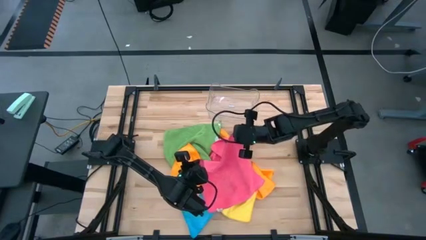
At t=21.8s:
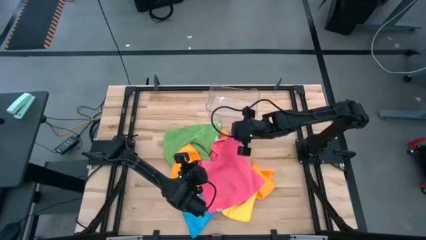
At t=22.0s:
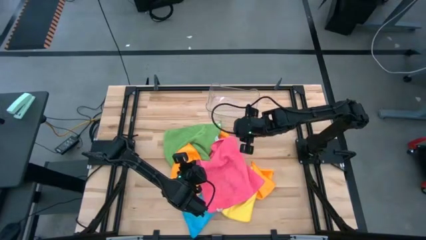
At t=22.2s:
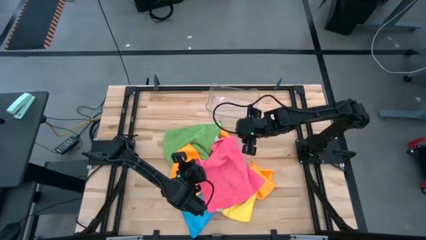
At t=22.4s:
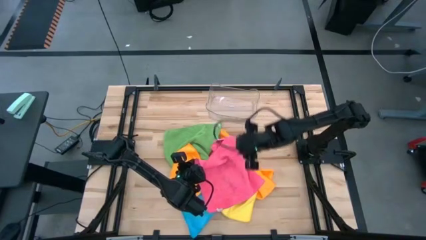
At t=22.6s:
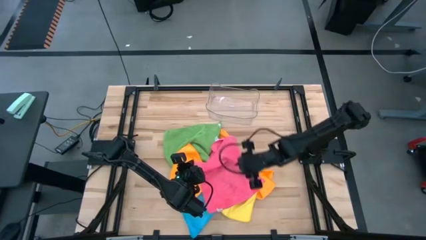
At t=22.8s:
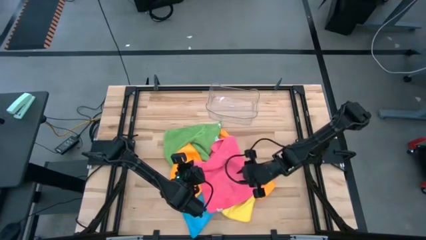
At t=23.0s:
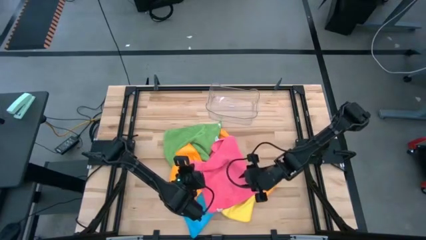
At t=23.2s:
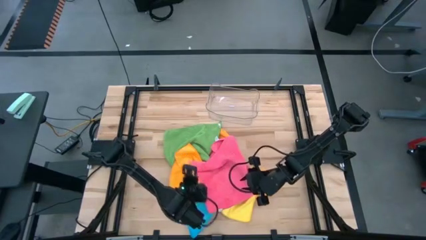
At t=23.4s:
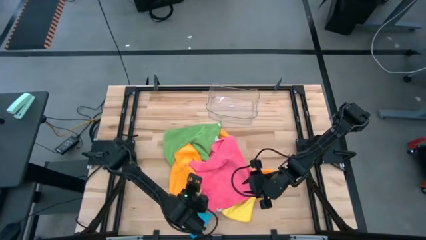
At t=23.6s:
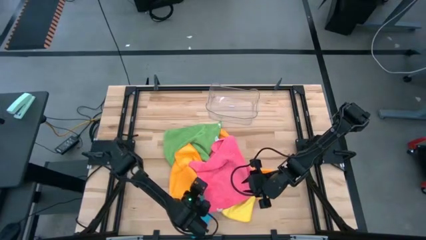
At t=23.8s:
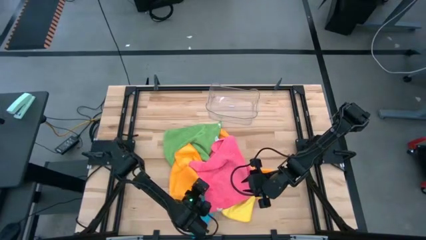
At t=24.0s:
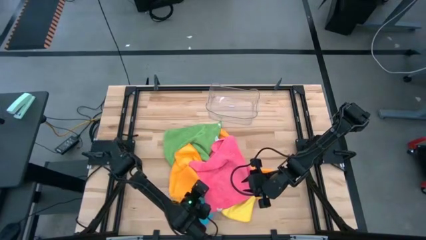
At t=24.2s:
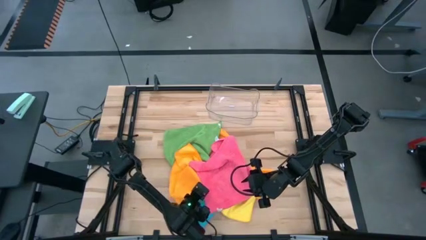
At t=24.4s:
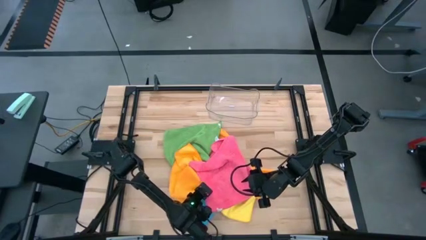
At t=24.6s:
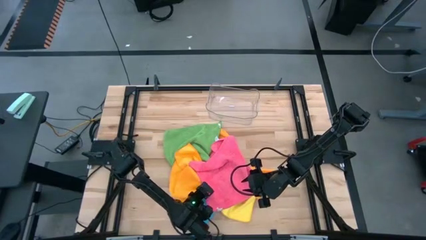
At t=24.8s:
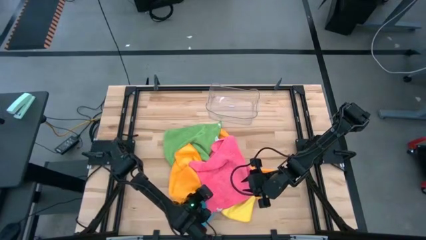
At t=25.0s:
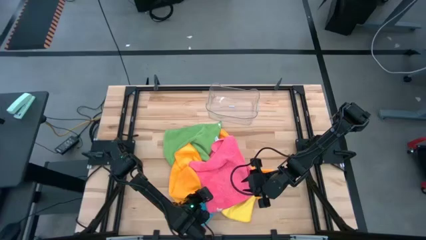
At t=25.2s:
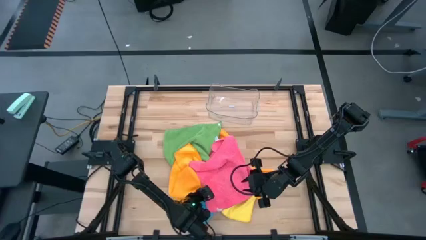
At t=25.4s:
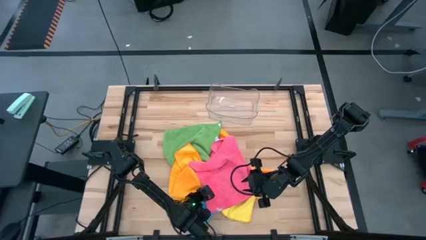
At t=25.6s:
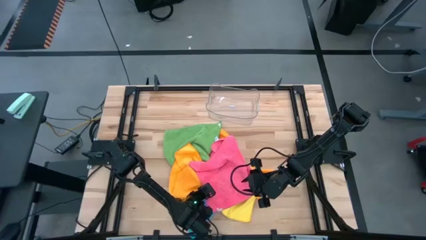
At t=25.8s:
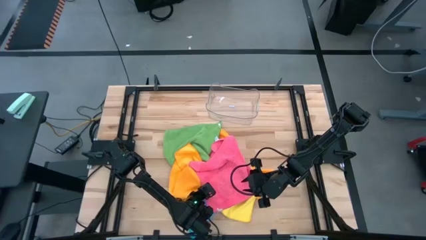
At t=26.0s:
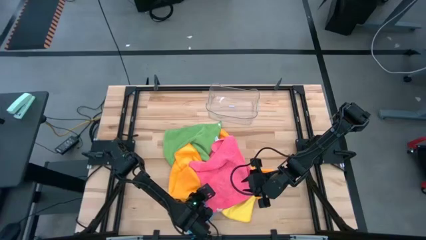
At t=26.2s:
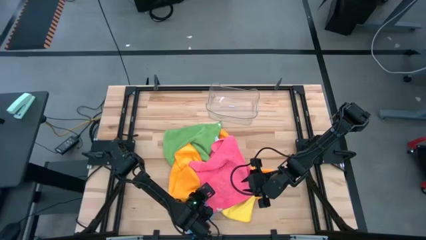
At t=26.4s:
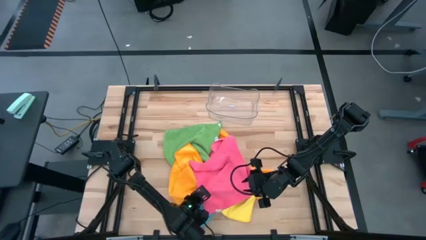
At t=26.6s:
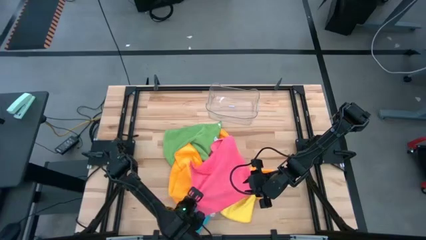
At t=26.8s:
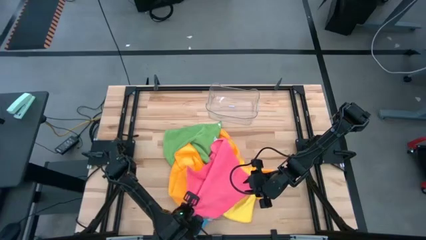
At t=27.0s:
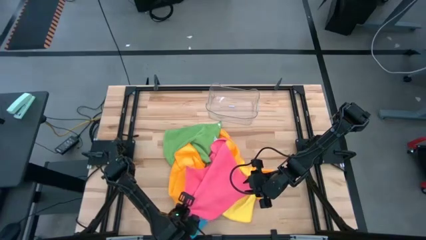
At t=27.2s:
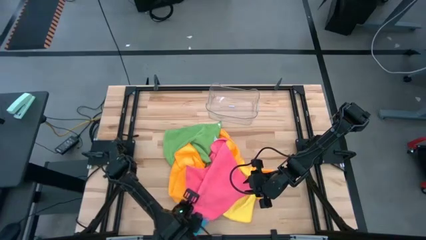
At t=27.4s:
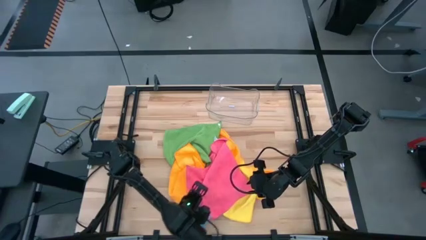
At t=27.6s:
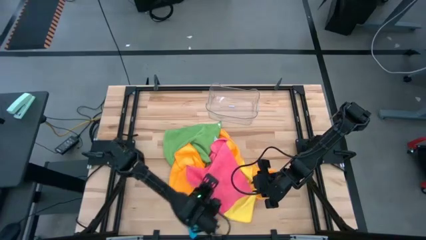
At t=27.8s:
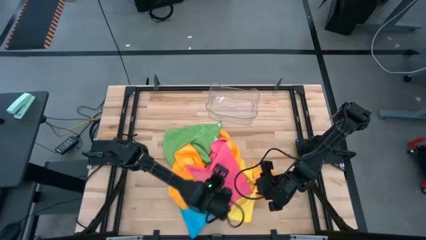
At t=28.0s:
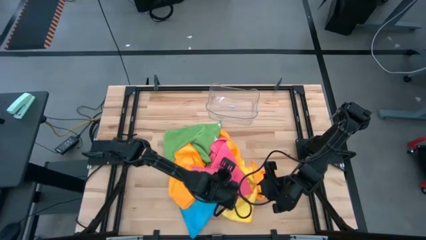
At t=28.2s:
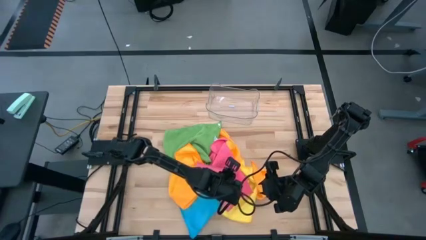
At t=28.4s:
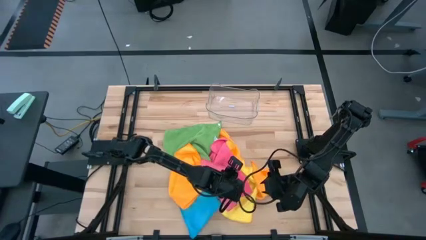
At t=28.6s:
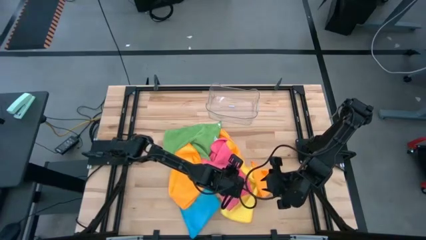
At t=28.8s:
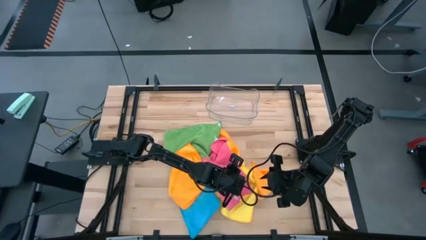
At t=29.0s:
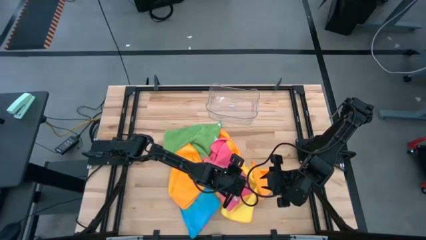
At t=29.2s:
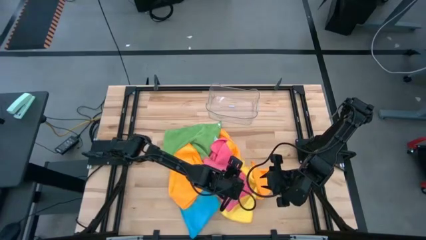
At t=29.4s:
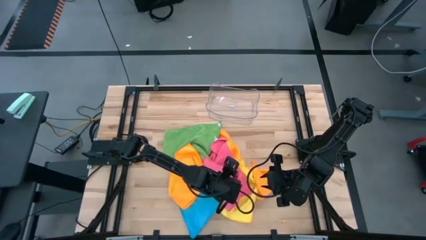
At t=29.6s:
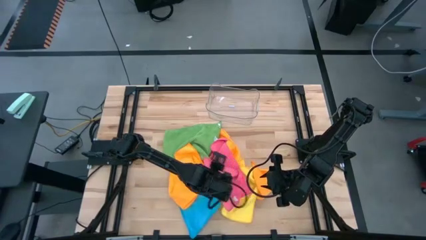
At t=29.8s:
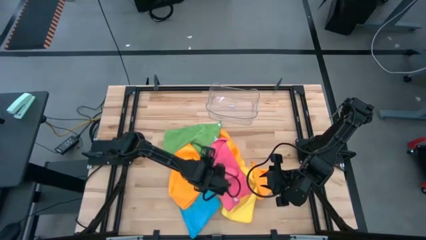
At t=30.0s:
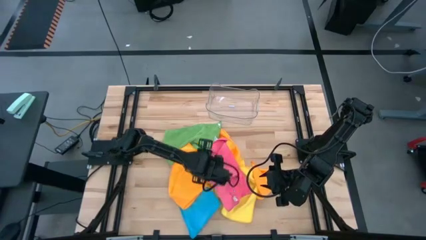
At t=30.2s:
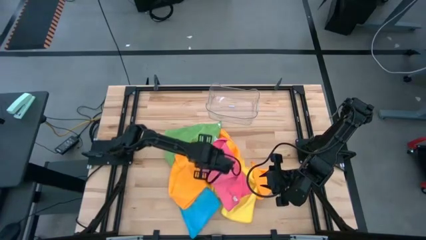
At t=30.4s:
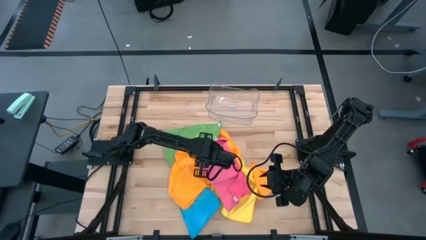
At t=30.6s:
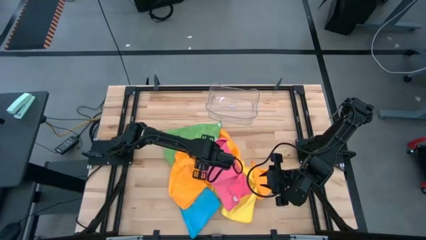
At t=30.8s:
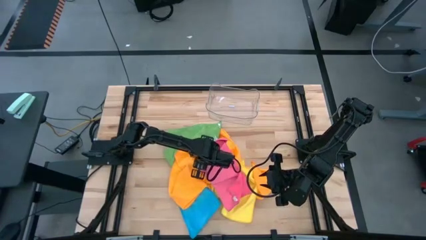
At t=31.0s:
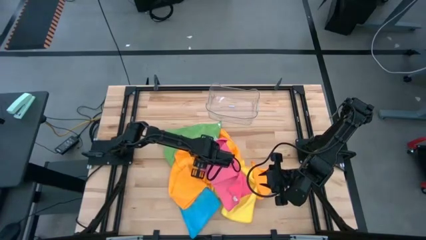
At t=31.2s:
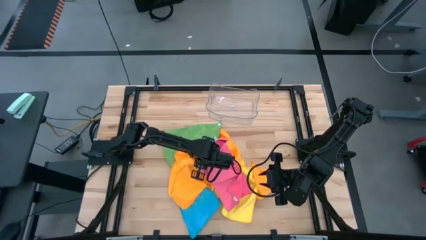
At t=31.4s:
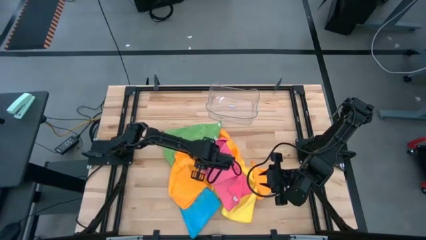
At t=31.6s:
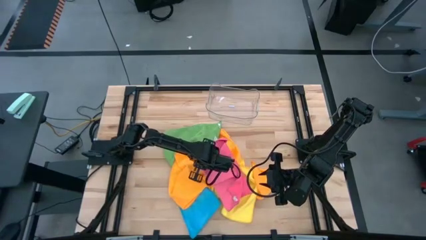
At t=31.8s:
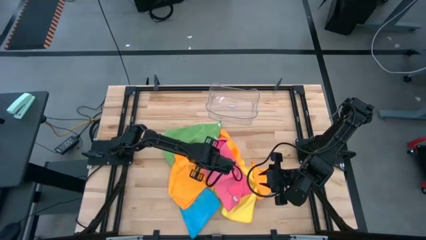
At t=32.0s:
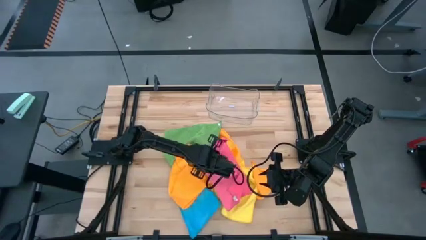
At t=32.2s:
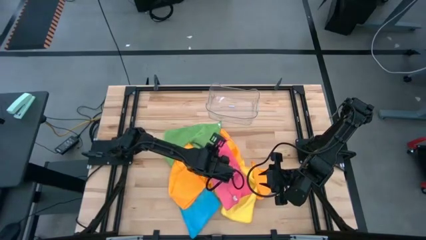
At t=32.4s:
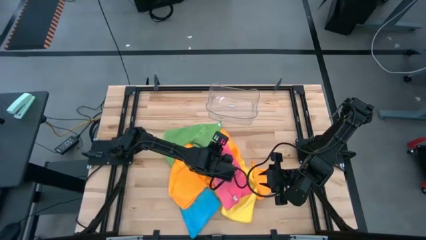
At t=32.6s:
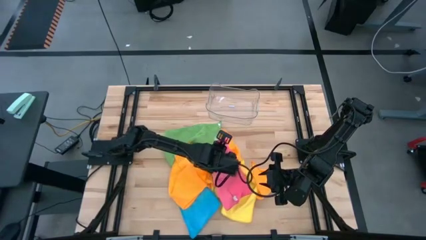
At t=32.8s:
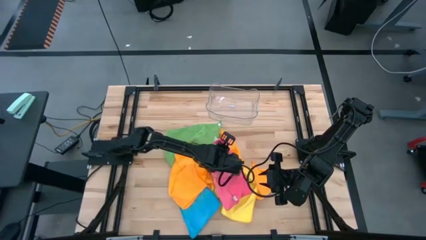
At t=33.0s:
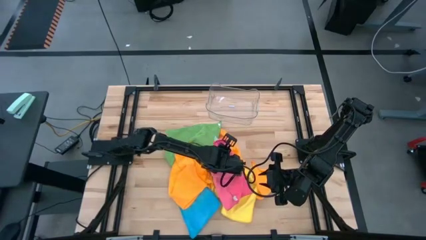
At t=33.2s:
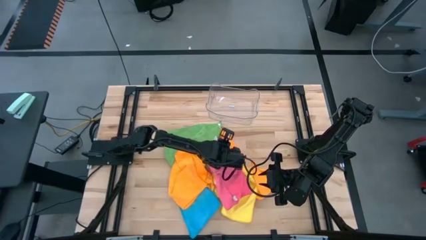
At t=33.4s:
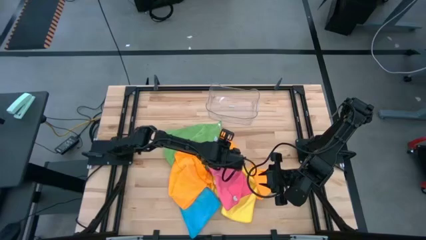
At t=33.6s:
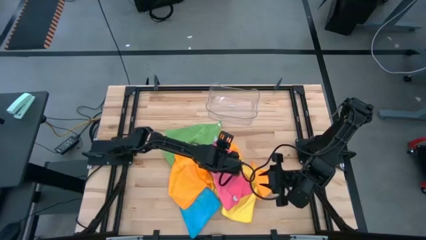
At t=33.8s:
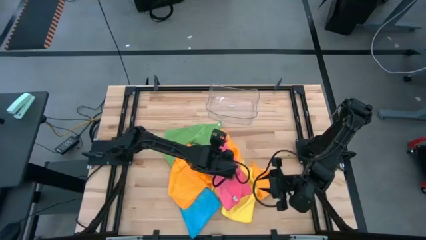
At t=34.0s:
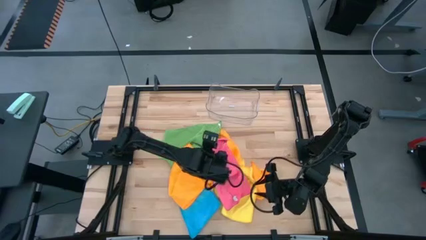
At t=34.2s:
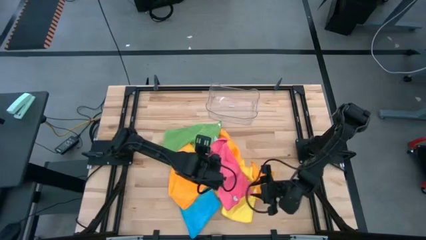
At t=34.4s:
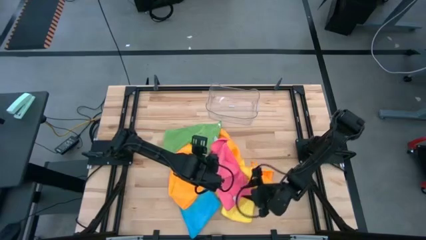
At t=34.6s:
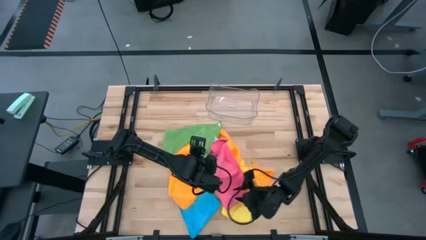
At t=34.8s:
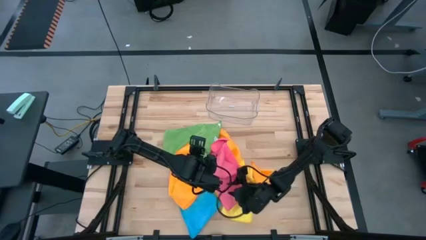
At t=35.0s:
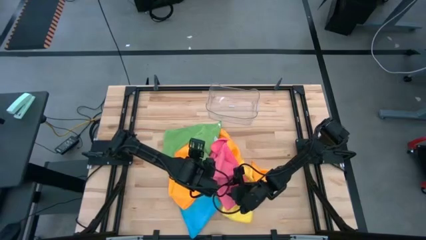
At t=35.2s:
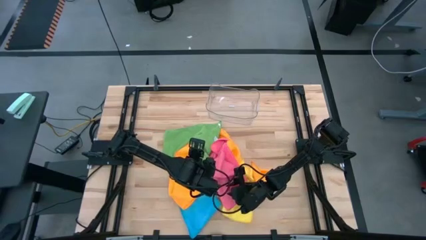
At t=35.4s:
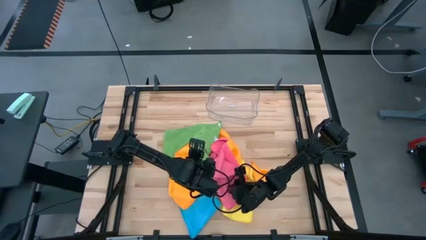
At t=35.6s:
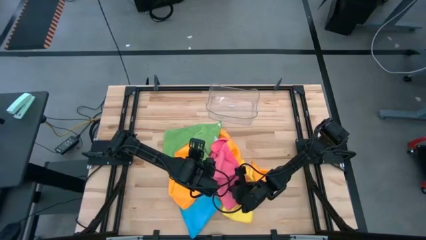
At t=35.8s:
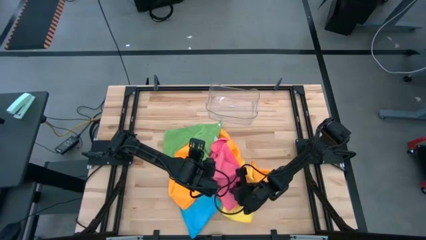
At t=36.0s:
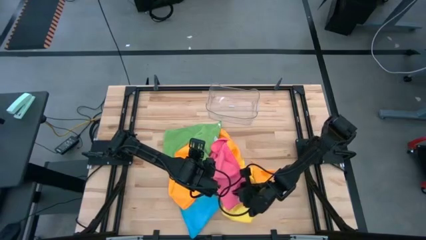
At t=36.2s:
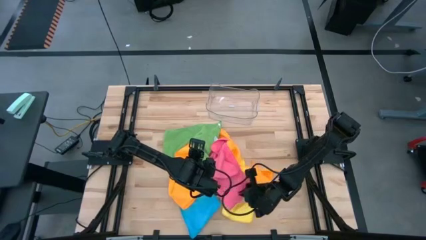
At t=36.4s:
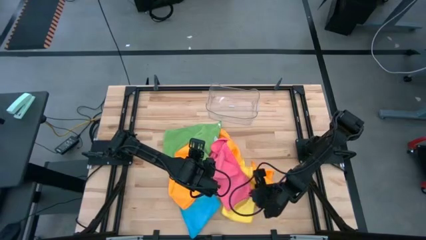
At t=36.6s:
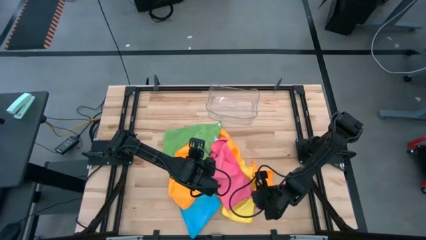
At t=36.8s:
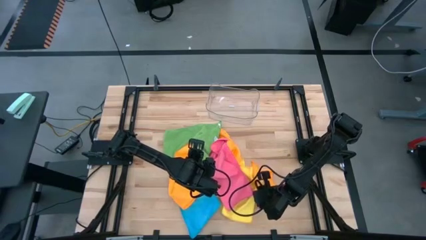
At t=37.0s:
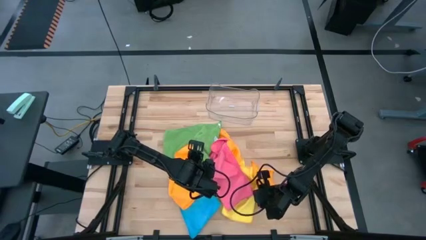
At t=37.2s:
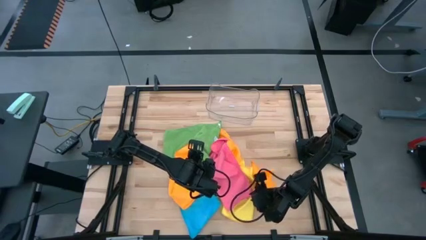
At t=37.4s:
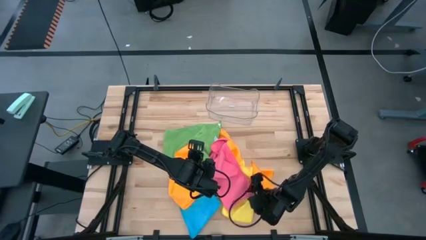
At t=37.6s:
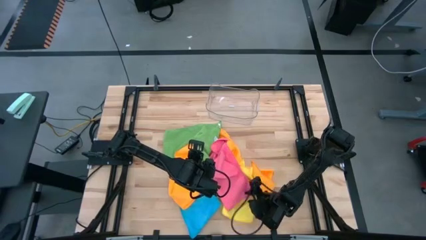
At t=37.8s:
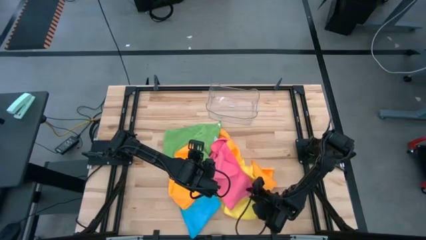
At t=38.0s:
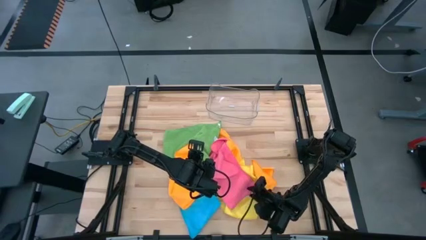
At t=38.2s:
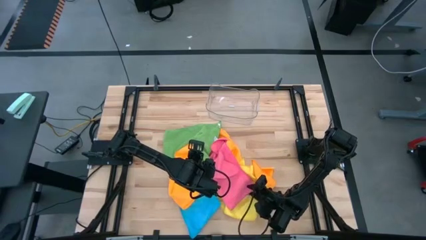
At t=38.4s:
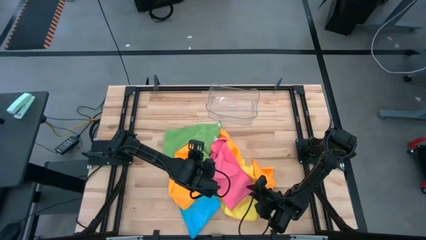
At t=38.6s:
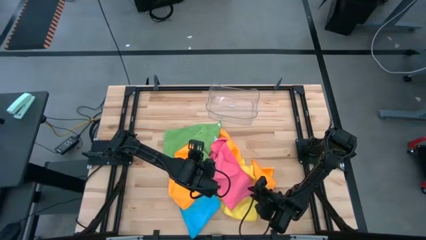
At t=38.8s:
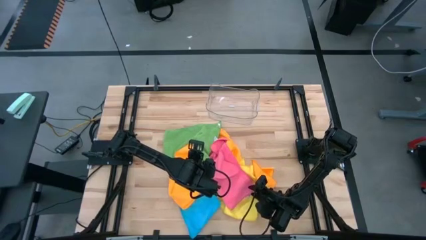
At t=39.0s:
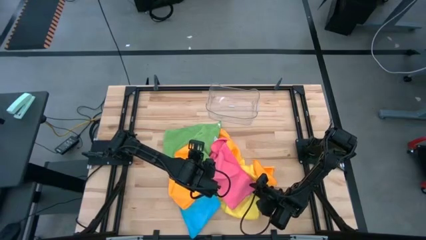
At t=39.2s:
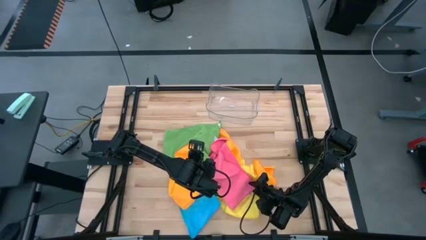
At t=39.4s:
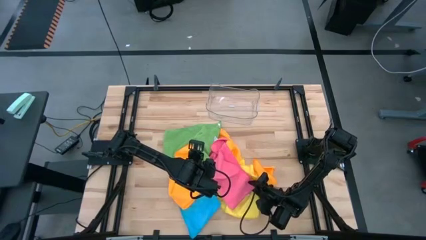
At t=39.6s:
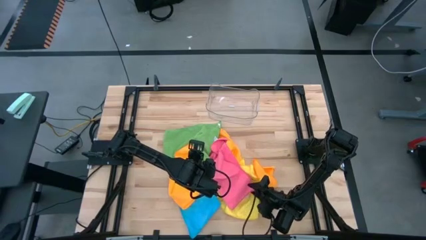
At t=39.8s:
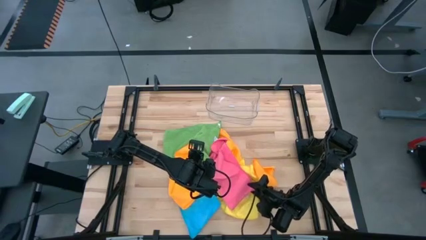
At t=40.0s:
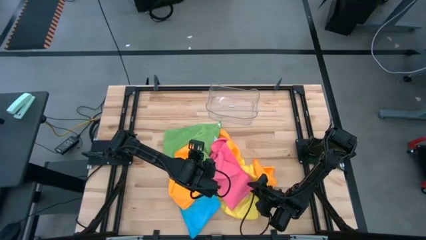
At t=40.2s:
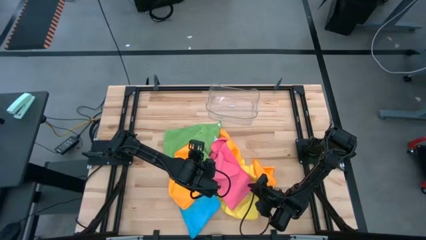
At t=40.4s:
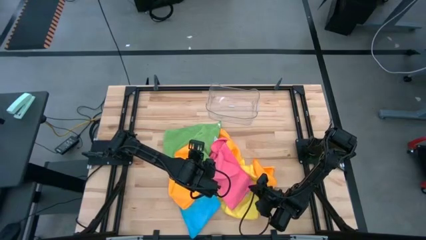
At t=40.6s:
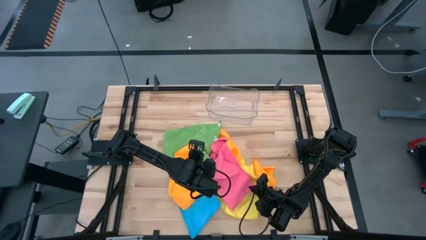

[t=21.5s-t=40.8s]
Task: Fold microfiber towels
Fold the pink microfiber cloth
